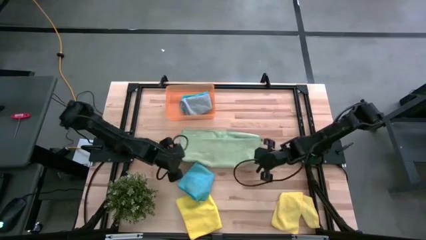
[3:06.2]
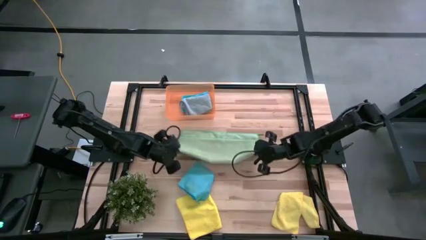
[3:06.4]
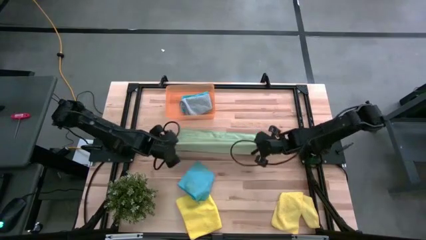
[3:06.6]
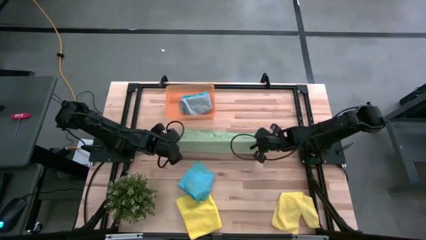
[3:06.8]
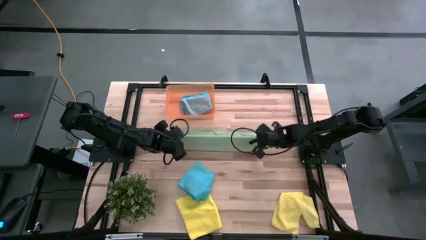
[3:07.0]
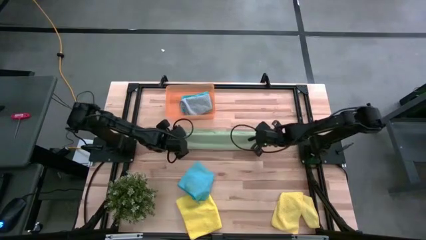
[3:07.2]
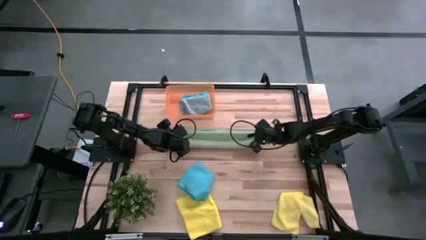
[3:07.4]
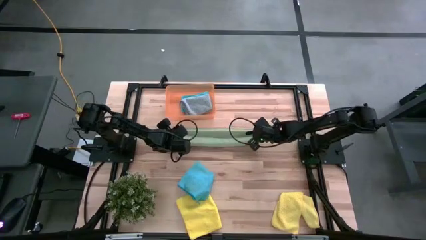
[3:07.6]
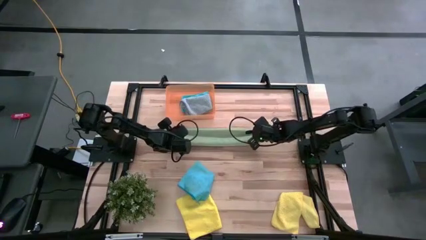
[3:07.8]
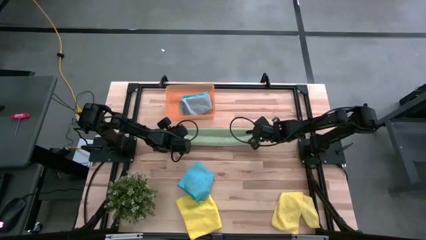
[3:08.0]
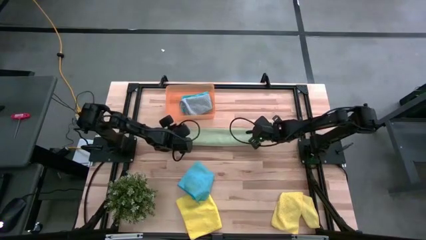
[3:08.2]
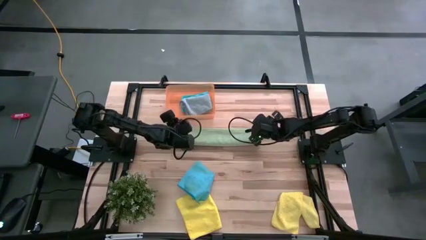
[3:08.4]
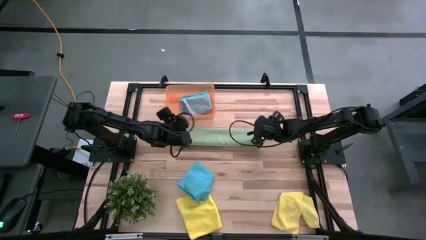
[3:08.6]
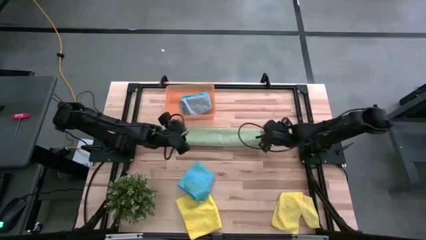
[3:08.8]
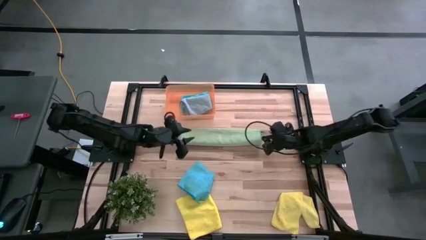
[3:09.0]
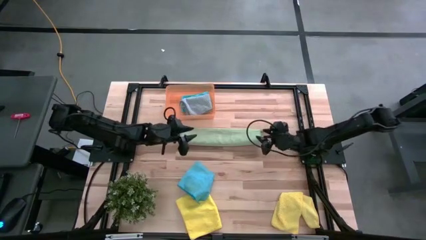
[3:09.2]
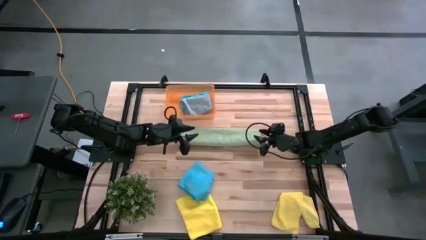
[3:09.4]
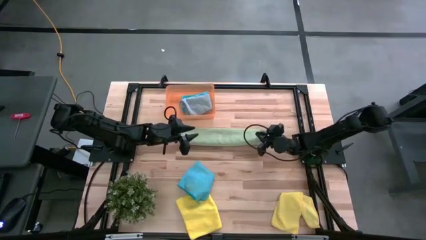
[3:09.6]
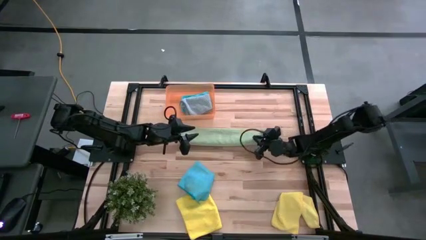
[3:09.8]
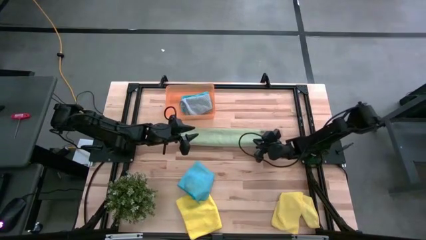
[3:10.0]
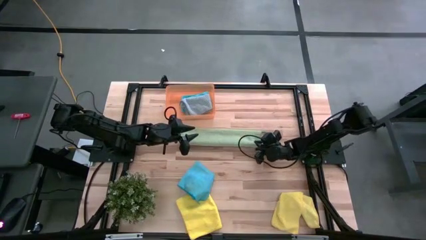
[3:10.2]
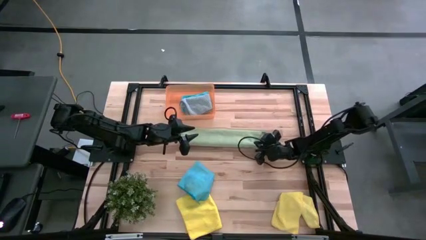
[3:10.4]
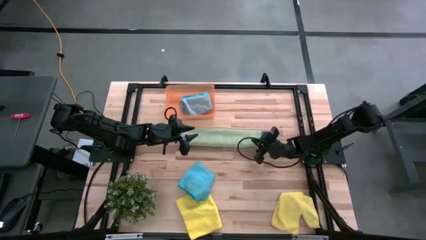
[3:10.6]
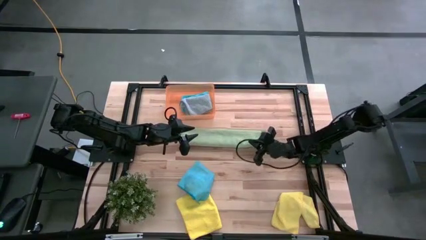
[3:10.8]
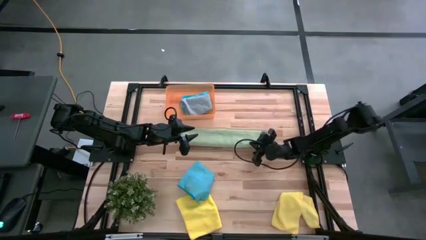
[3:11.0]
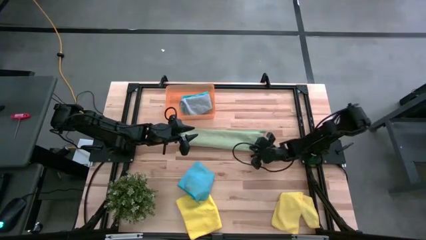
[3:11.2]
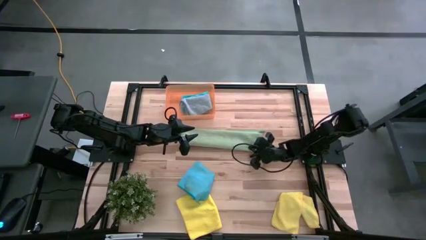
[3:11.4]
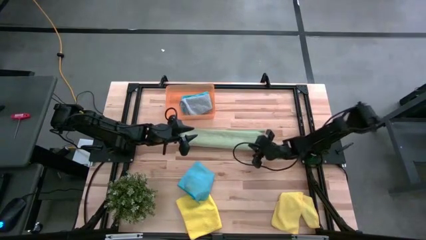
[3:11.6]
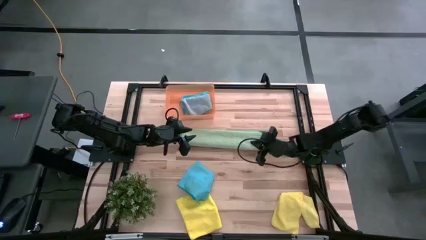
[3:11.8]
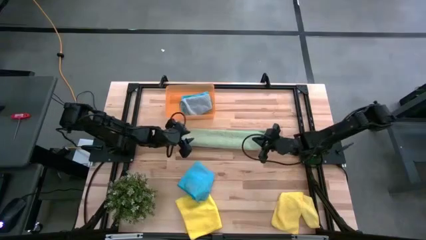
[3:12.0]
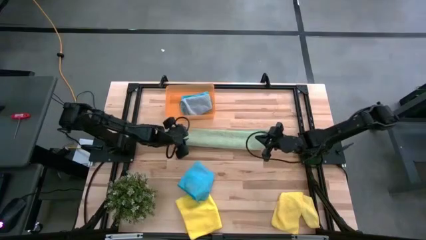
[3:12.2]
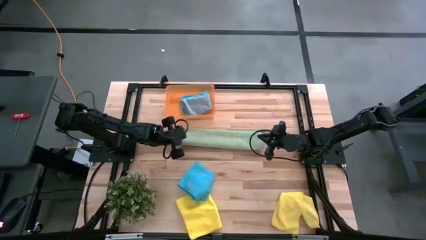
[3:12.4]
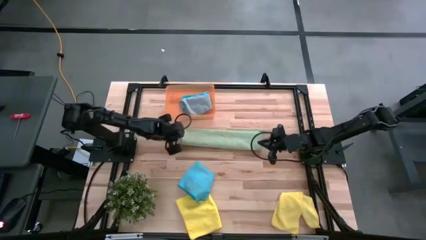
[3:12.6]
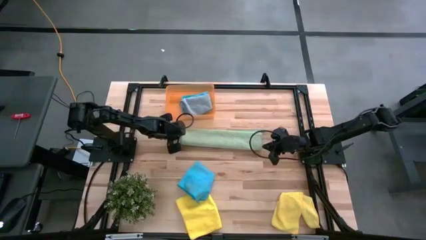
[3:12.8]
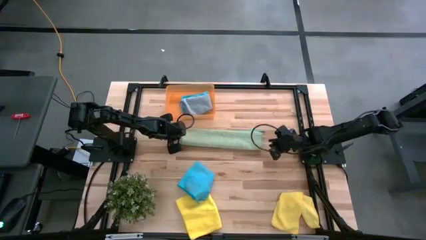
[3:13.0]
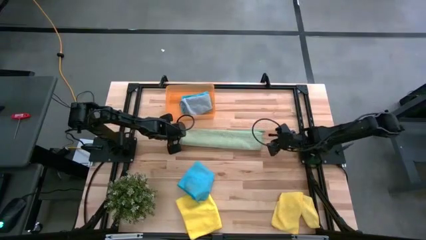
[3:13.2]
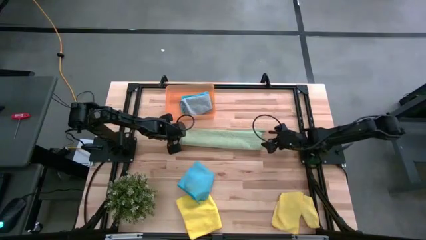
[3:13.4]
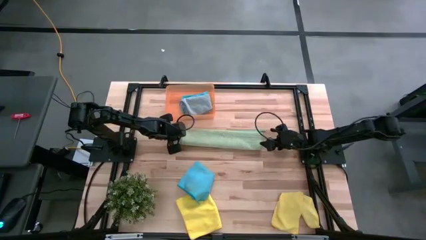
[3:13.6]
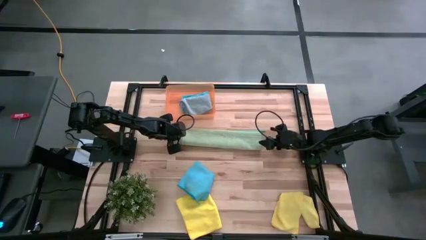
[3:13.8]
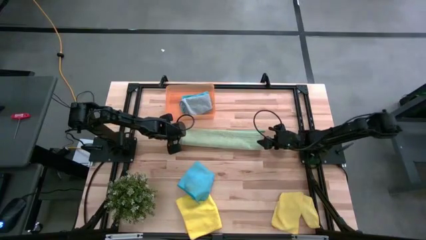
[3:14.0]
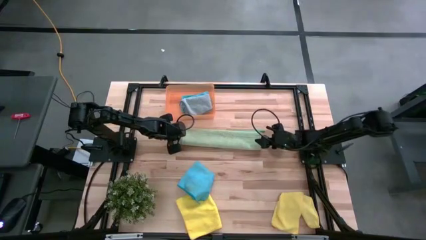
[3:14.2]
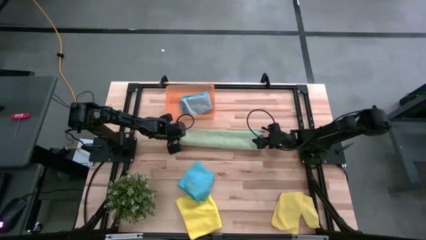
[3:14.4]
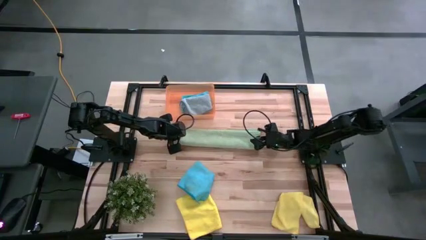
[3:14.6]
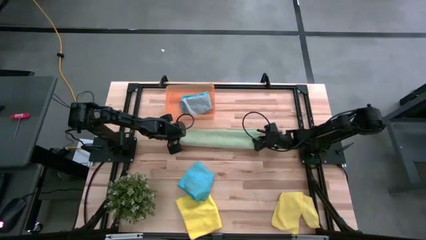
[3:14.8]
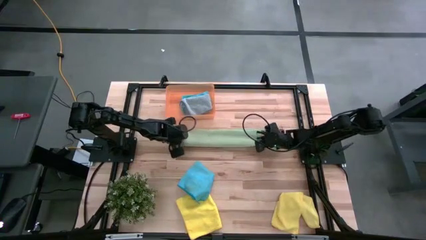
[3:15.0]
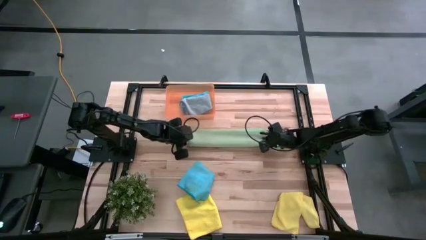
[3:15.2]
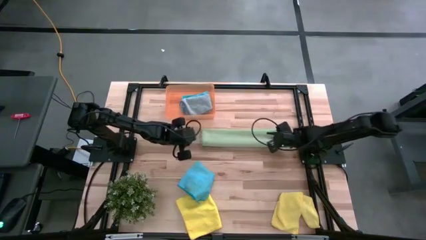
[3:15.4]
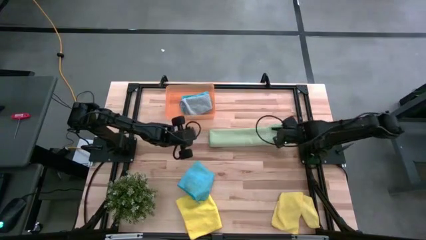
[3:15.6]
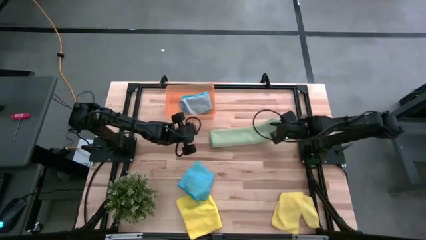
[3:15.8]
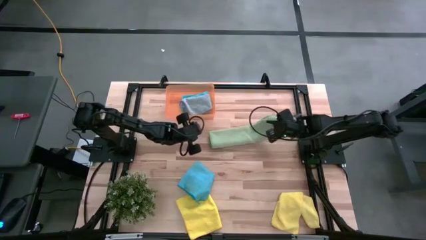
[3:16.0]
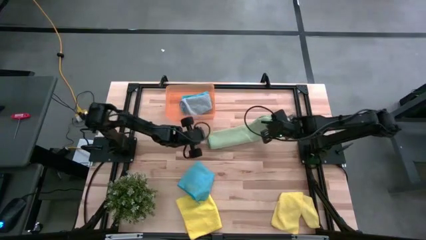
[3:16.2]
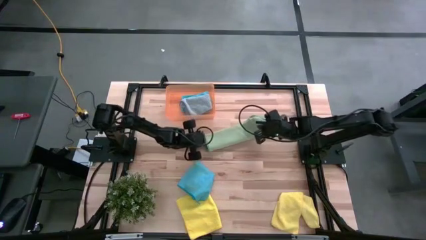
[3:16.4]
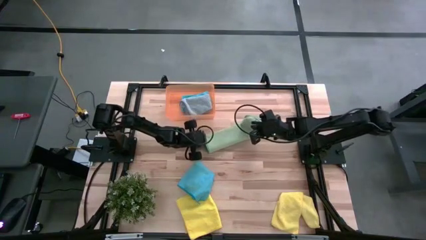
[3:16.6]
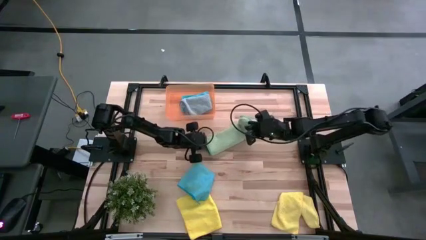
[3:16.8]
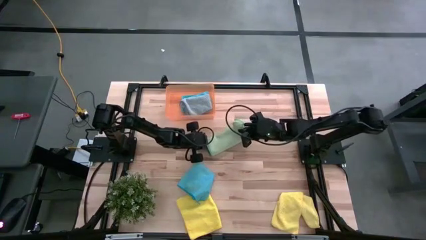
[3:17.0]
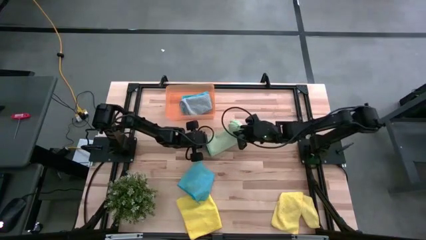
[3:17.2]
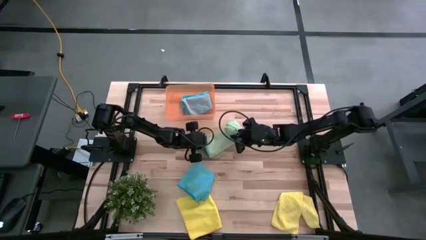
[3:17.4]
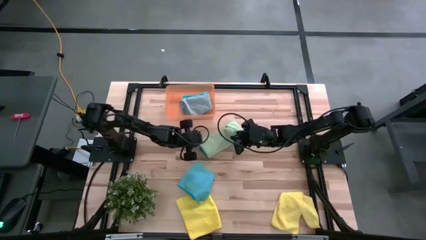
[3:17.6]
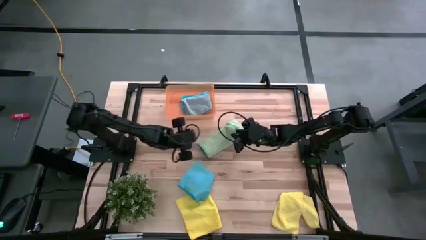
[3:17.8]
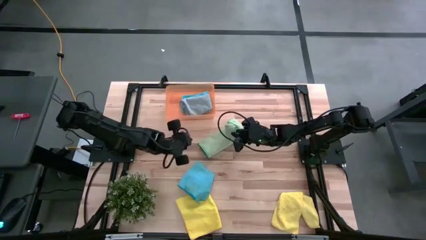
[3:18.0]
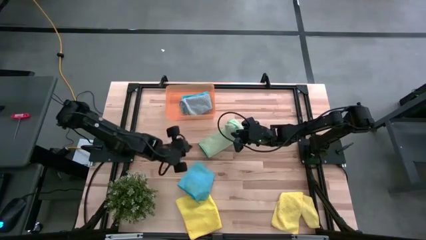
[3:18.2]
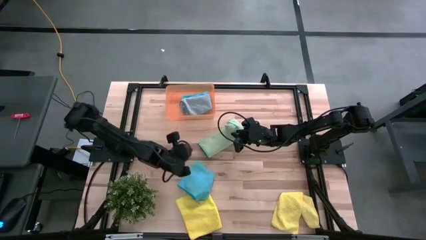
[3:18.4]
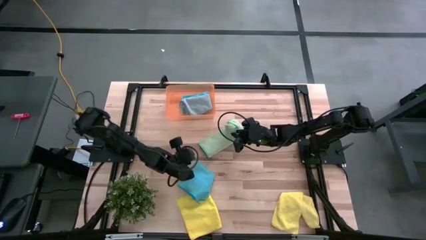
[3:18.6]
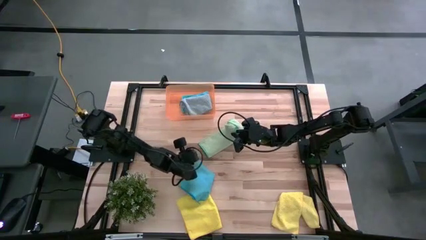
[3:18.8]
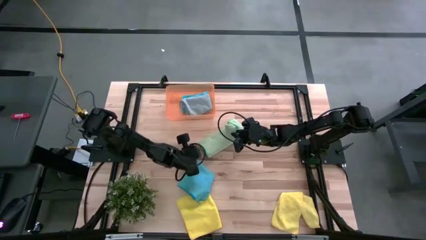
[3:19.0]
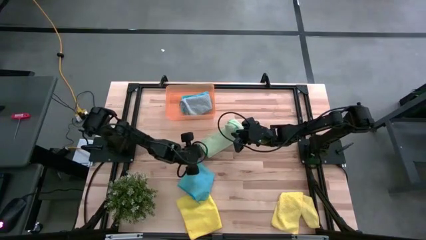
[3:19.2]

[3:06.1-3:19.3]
Task: Fold microfiber towels
Fold the green microfiber cloth

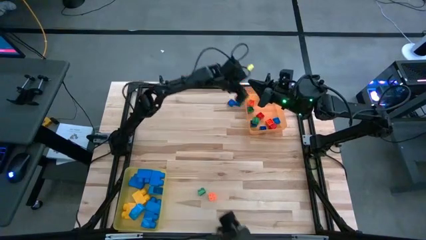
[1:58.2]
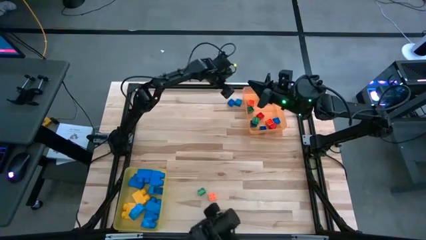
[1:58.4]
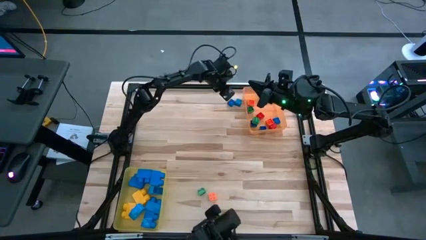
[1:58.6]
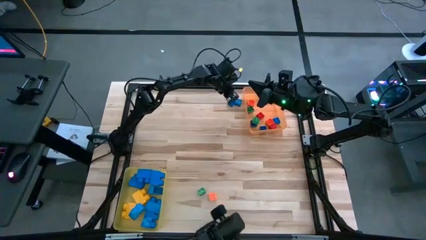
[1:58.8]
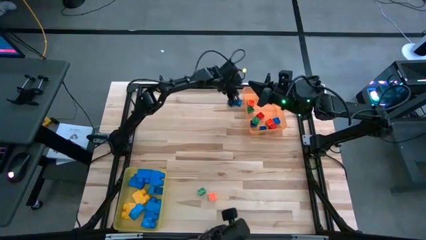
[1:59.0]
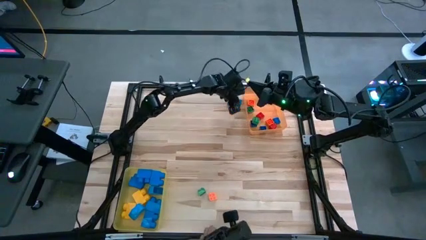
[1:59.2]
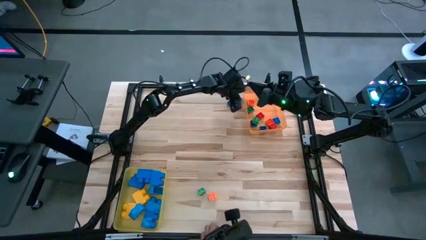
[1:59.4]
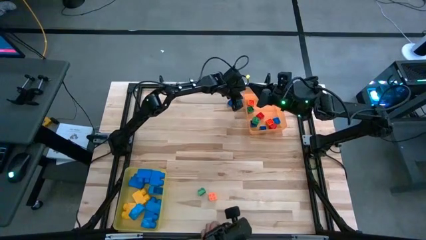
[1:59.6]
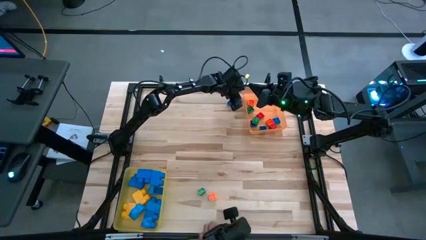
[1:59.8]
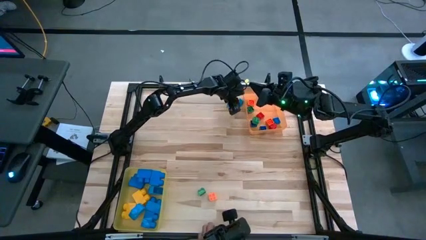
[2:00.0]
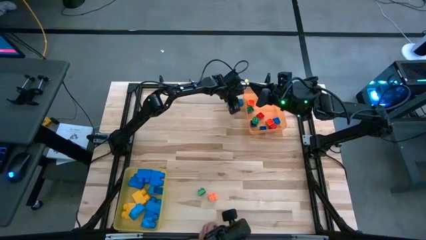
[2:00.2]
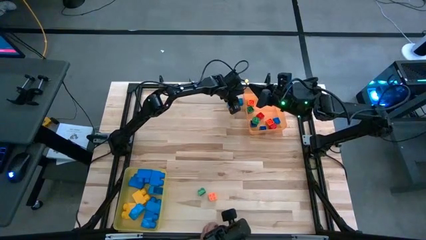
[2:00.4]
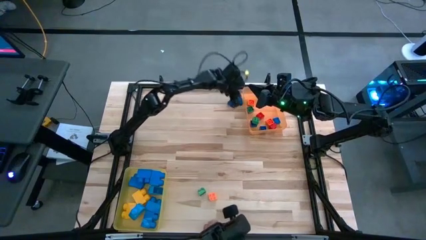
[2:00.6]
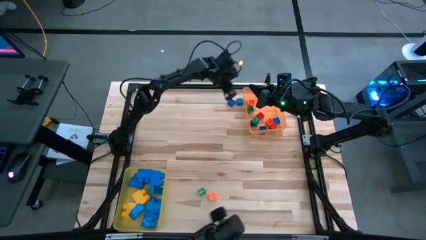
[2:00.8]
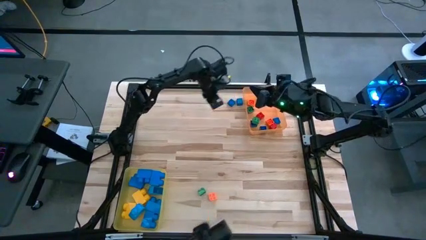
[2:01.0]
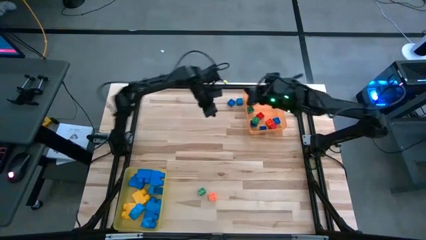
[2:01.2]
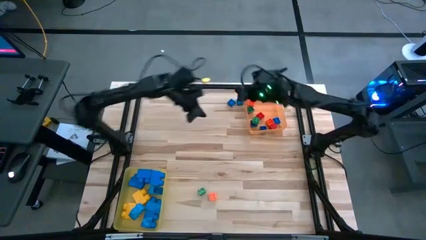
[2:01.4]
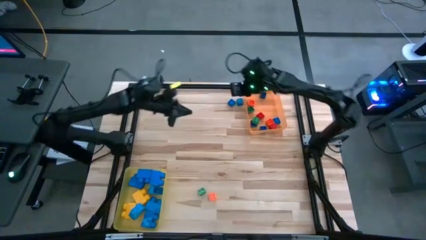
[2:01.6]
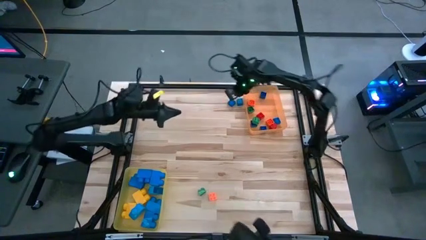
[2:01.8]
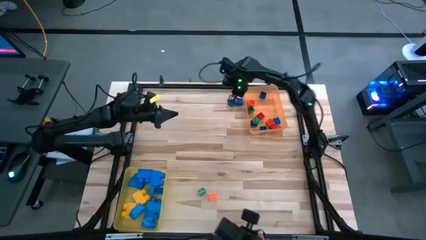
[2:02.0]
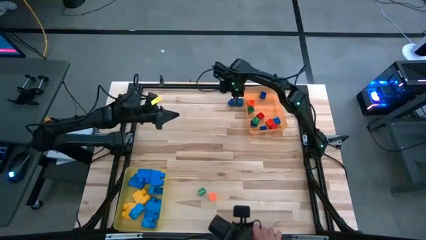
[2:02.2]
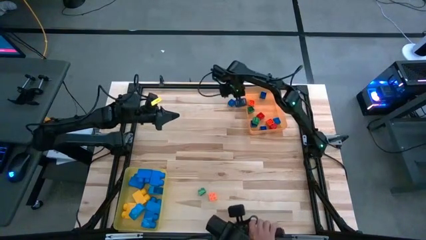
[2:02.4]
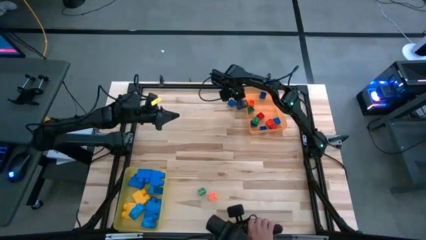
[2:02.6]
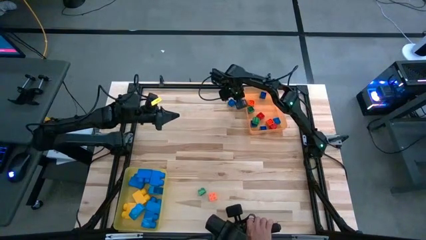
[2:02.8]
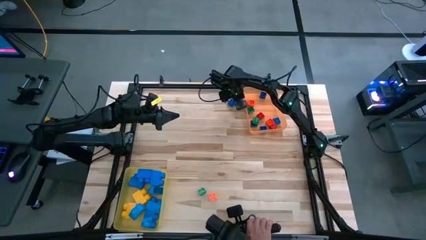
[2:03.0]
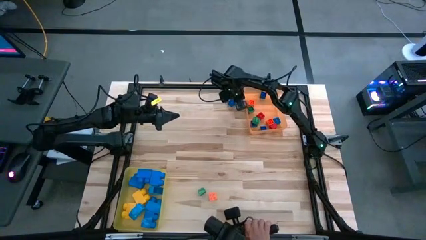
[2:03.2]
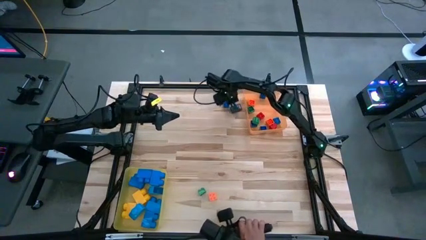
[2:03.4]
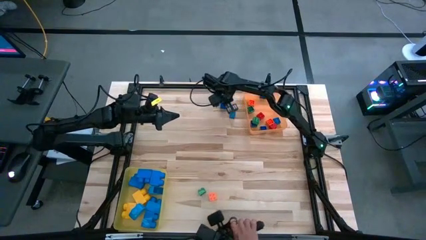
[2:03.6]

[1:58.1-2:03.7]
Task: Sort blocks by size
Put the small blue wooden block into the orange bin
